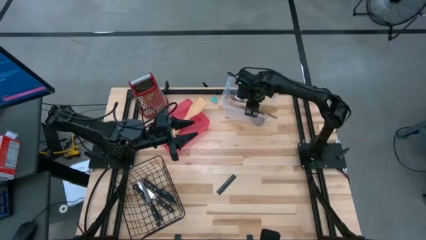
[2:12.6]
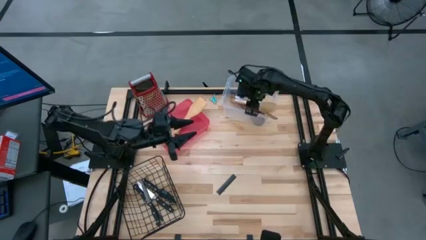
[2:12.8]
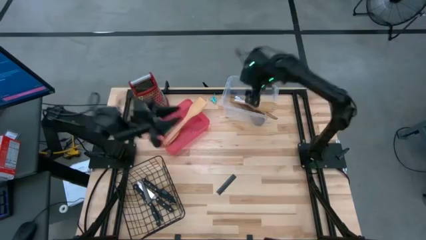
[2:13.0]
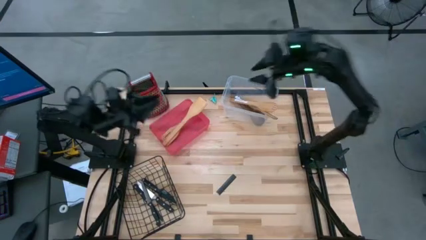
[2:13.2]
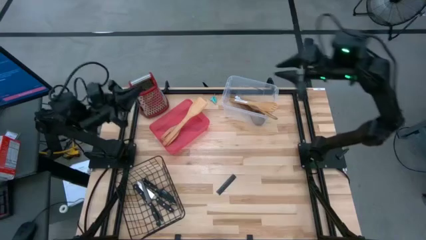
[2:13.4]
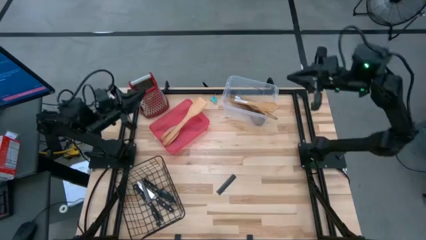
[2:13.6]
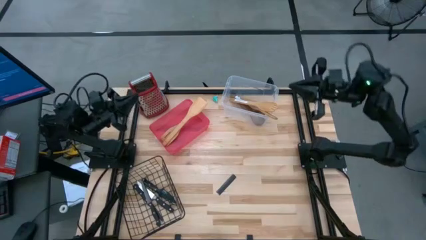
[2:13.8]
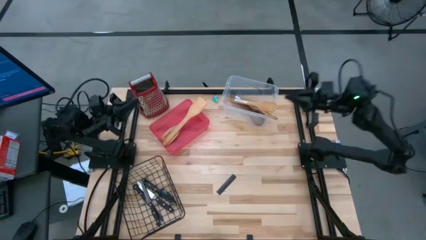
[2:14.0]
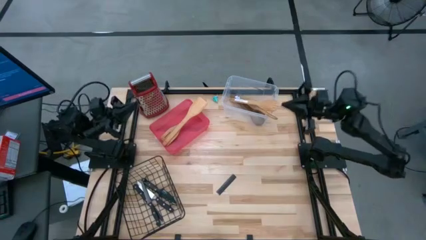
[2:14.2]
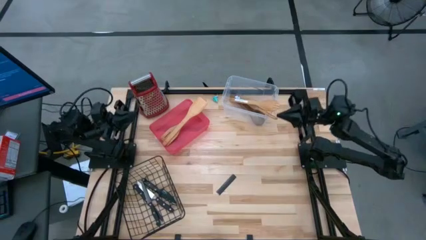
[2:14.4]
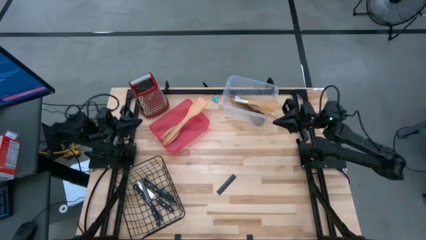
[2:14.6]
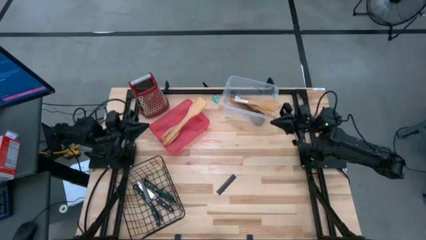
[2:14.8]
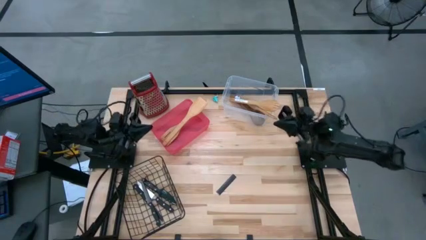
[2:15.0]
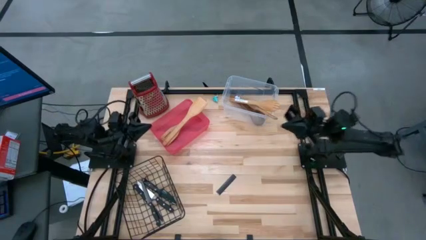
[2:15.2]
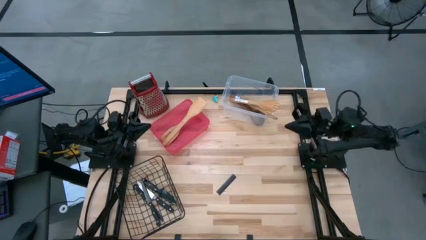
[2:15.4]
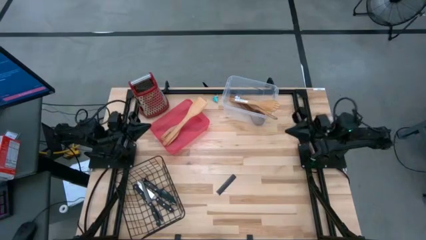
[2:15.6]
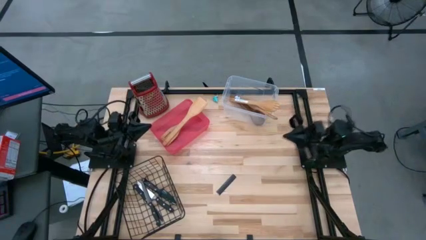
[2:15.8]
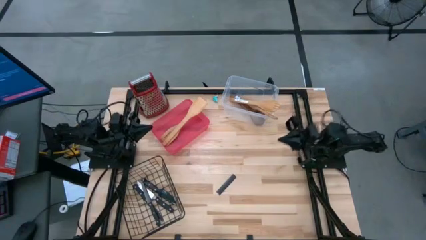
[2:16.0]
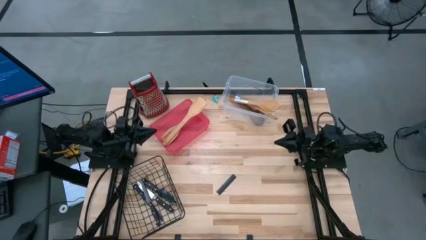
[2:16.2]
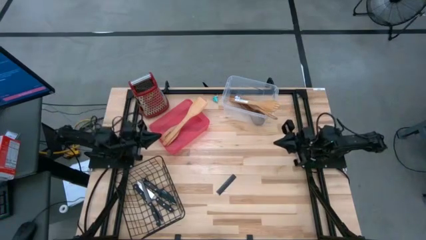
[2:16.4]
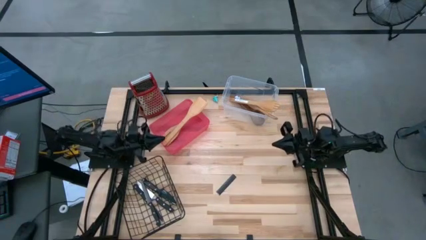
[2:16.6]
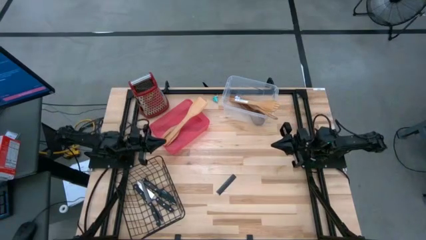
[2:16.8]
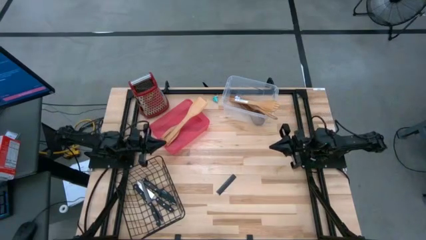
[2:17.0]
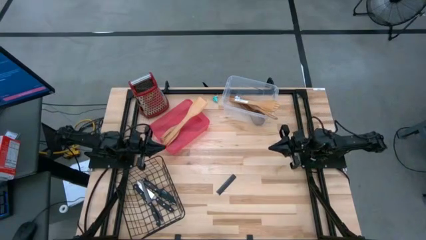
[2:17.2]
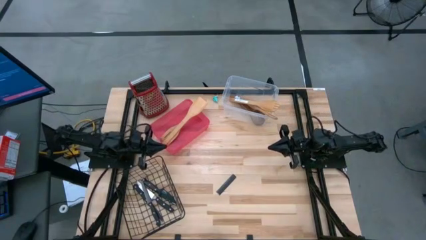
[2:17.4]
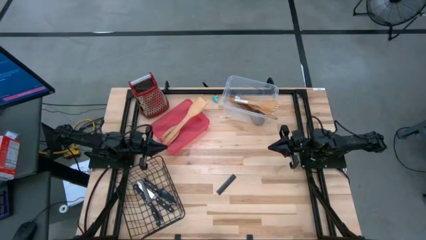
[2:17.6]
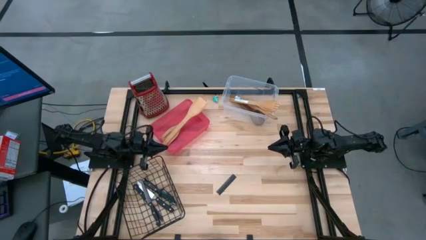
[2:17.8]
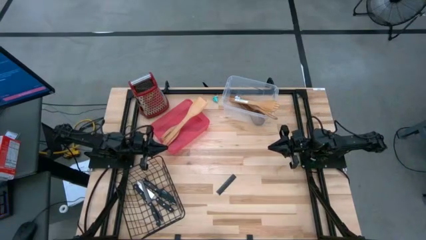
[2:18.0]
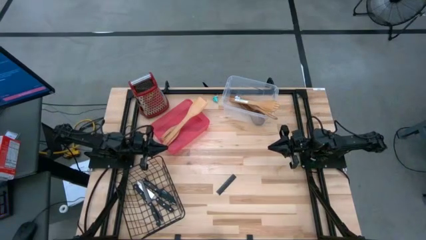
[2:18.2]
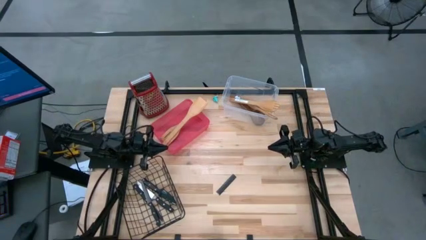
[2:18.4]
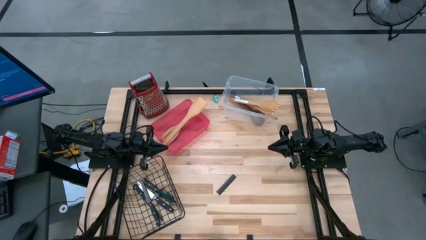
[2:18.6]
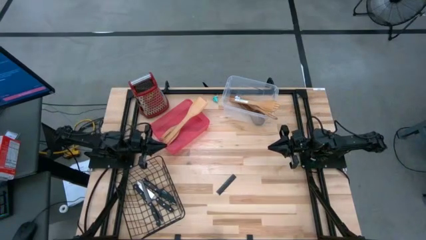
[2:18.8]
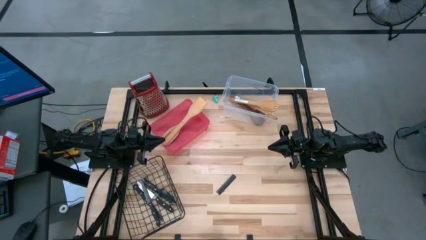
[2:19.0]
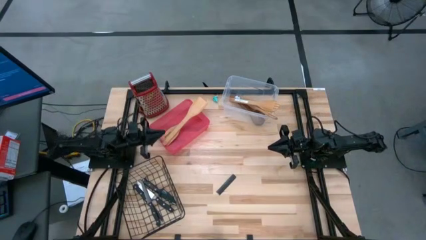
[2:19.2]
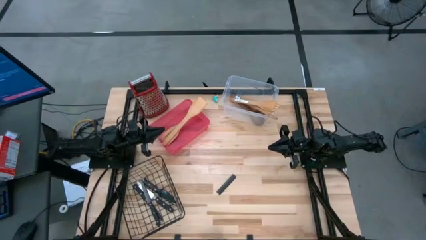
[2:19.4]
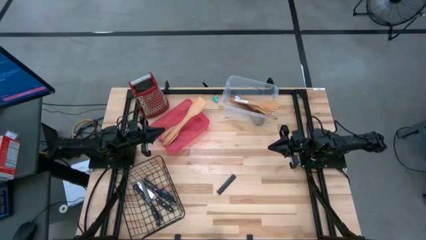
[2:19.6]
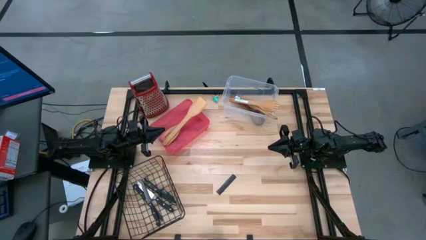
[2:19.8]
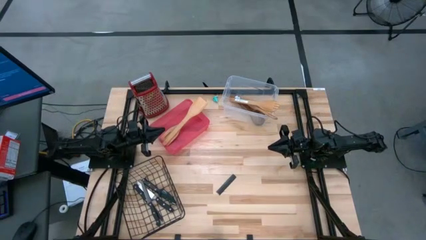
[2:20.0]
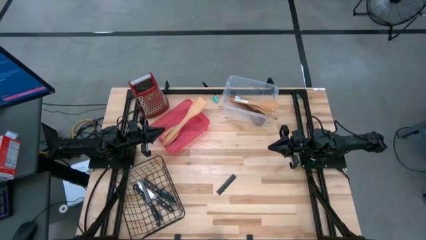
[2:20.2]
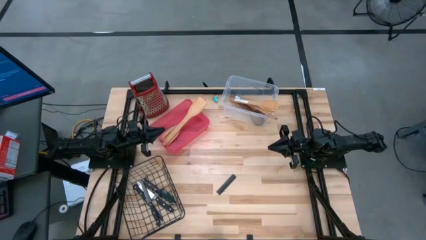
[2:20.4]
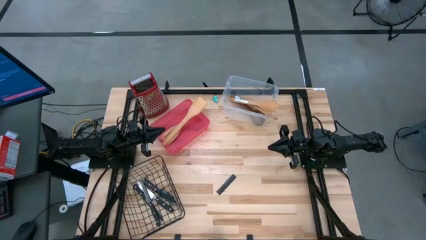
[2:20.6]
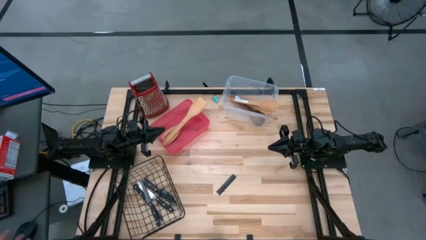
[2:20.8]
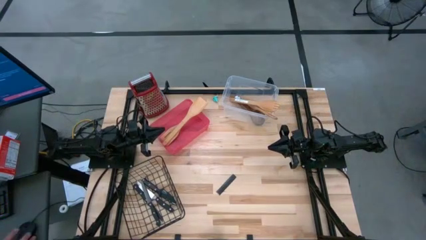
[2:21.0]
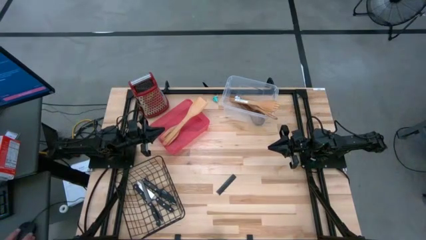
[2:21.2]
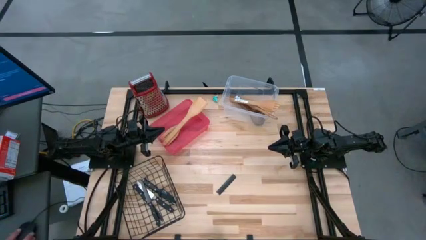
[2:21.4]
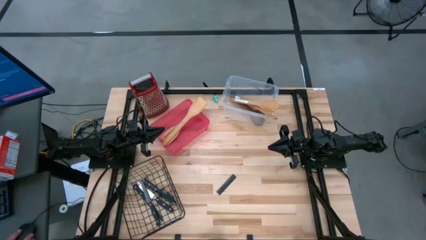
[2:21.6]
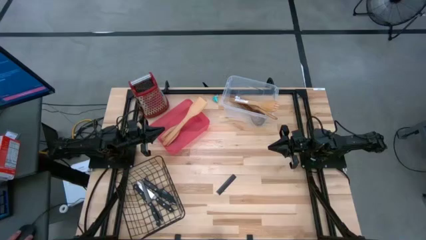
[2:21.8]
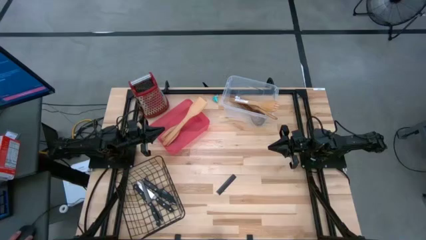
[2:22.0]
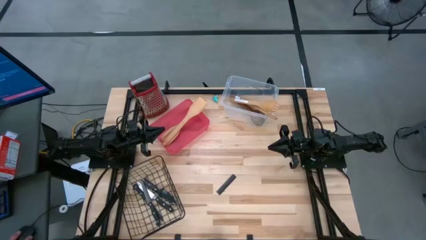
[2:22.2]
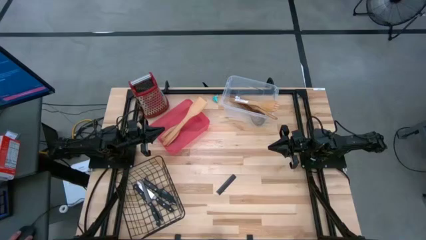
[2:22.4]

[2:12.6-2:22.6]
Task: Pick & Place Kitchen Items
Return to Home Position

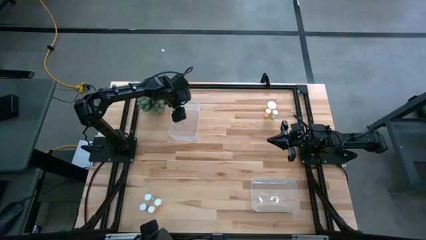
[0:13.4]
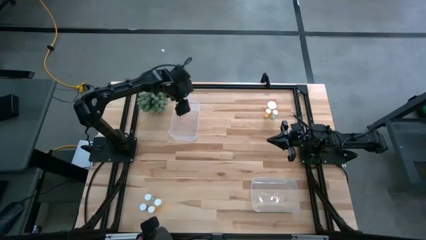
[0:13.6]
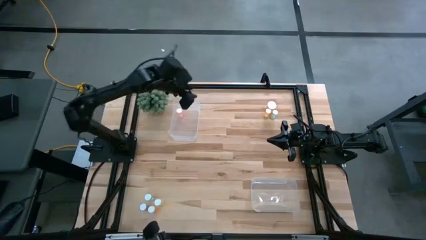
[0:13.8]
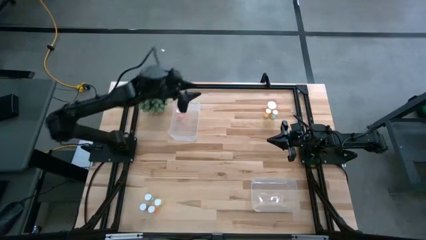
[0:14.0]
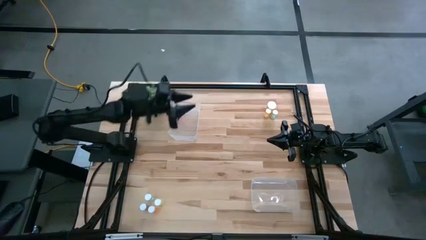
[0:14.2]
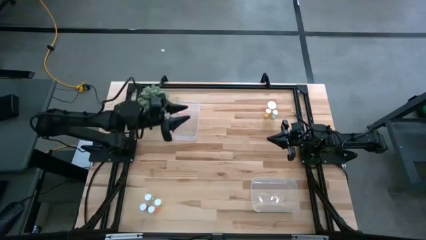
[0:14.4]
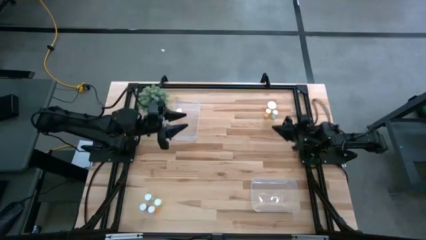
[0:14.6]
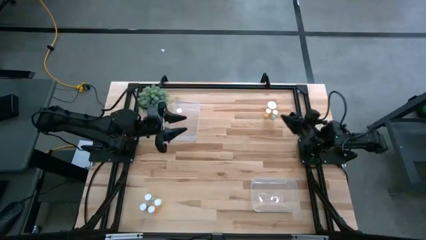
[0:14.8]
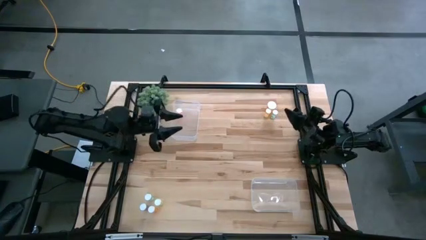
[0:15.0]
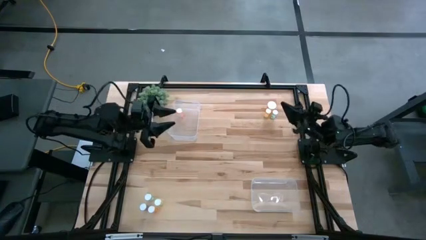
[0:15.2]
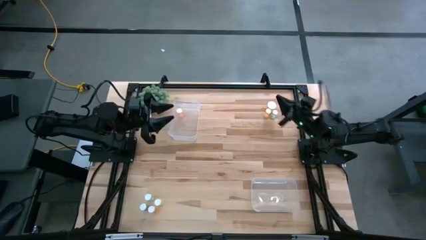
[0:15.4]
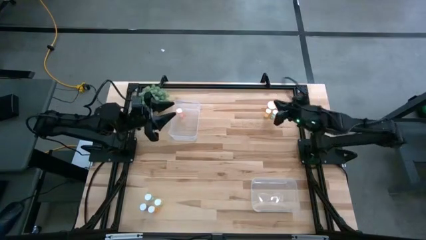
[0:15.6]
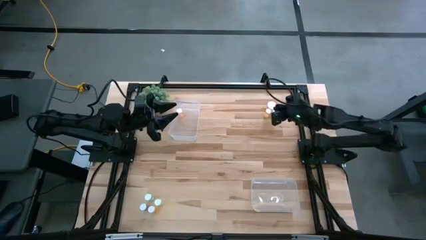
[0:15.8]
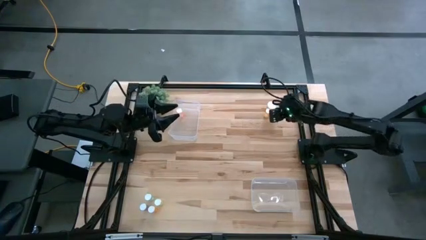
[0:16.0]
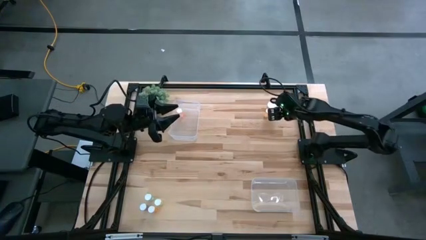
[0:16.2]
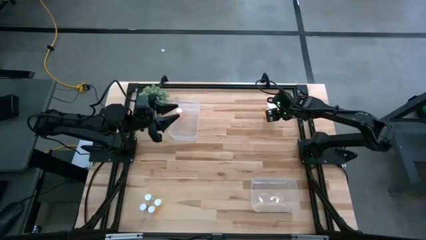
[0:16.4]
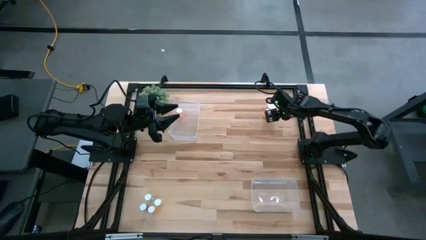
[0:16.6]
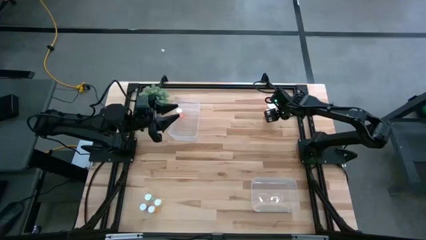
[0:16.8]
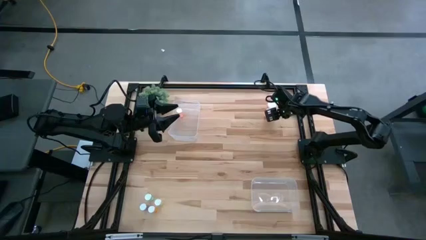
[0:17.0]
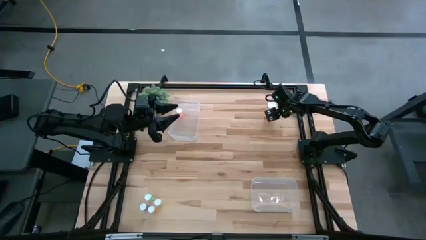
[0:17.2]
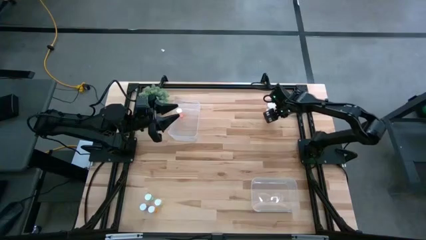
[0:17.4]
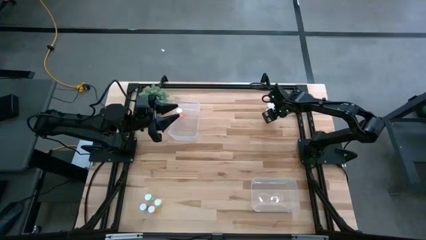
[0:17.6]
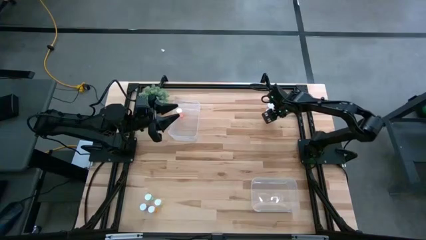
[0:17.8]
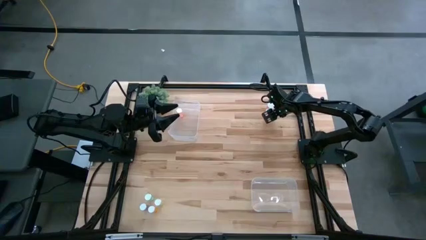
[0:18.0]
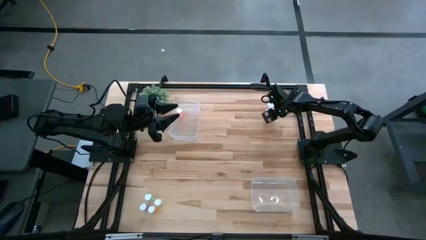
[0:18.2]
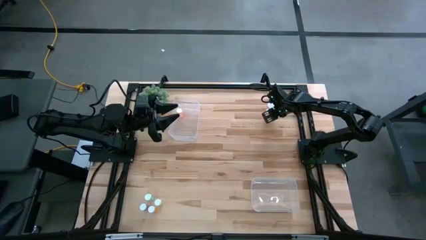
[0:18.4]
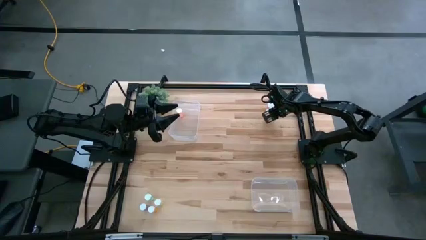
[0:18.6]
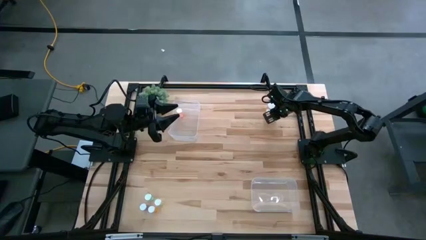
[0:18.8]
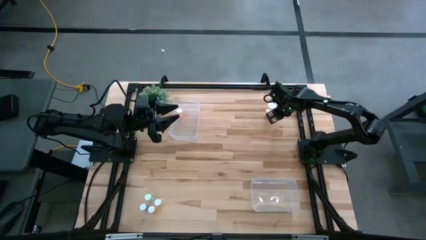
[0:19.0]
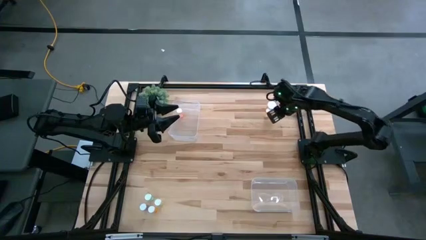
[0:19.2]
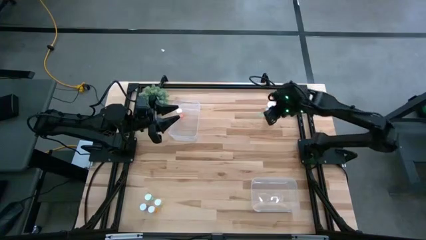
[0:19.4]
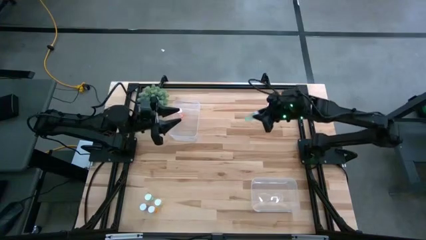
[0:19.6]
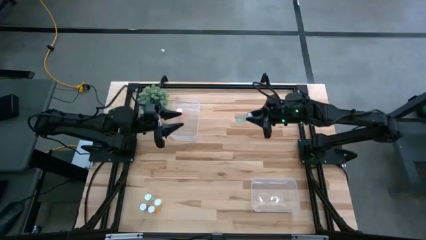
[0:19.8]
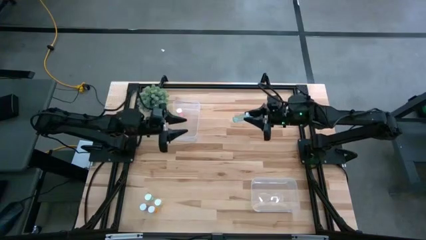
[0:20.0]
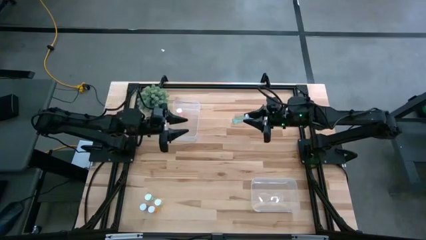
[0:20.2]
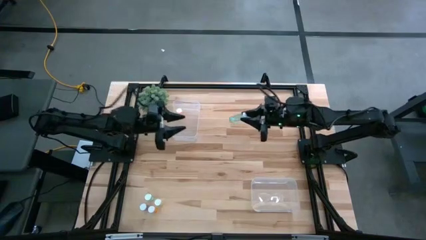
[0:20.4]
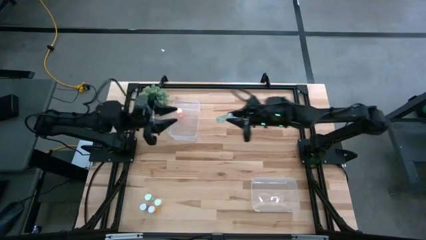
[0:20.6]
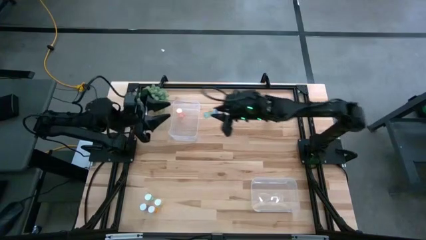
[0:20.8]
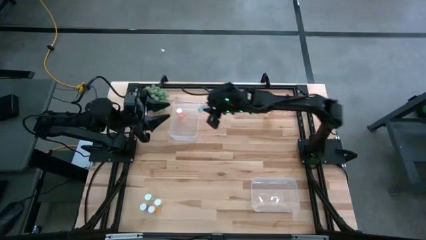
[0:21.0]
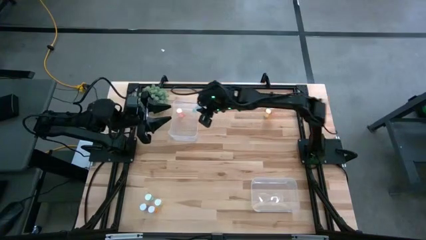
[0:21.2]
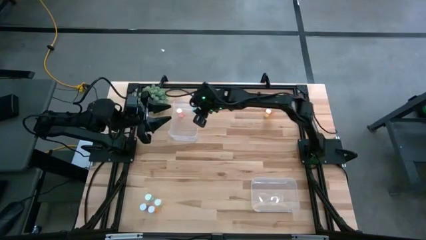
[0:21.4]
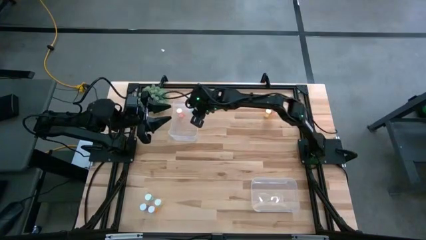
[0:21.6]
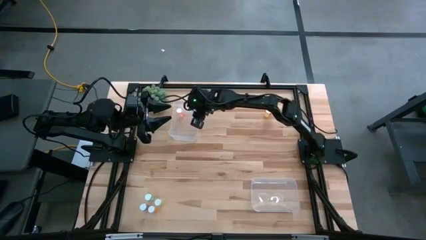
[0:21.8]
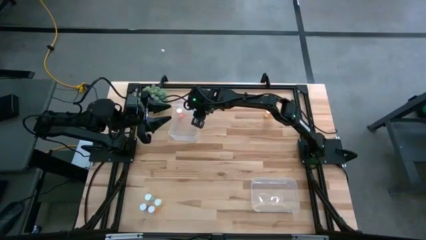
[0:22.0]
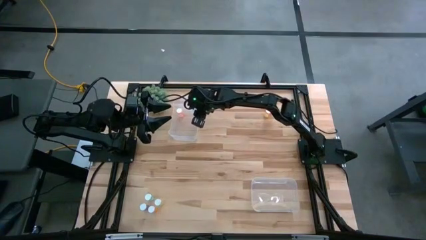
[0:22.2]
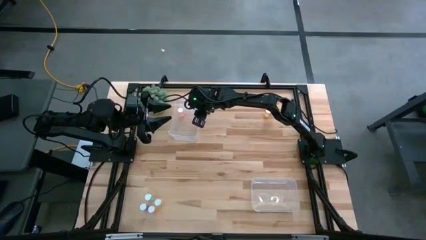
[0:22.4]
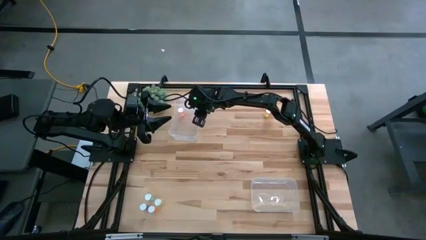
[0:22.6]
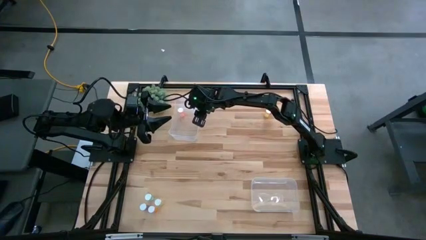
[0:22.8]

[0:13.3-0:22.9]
Task: Pick and place medicine bottles into bin by pill shape (circle, oval)
Put the top blue tablet bottle into the top transparent bin
